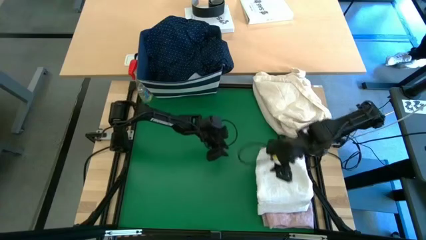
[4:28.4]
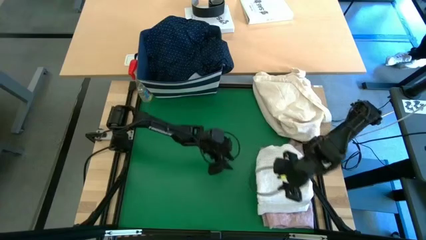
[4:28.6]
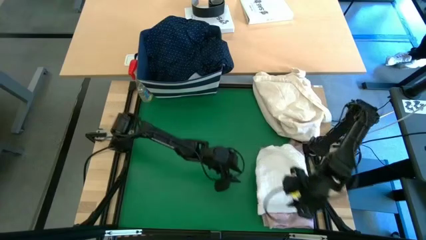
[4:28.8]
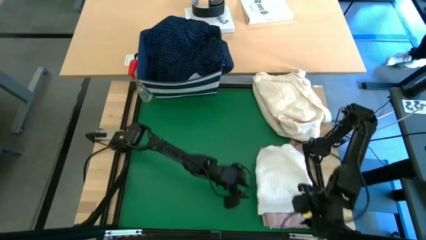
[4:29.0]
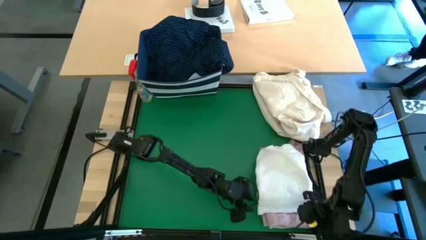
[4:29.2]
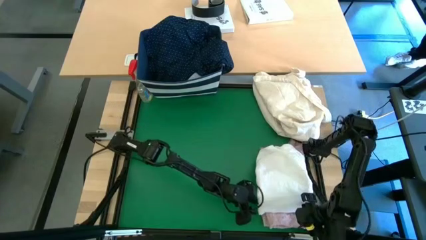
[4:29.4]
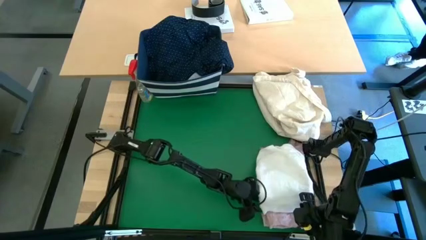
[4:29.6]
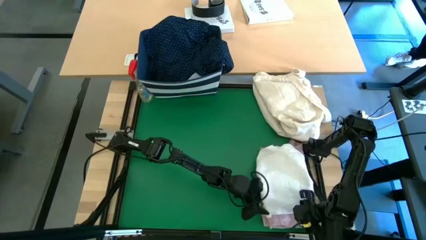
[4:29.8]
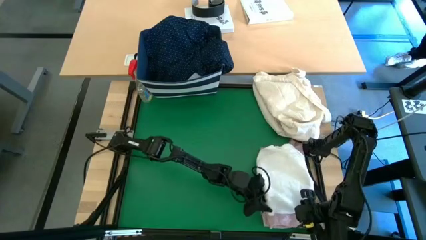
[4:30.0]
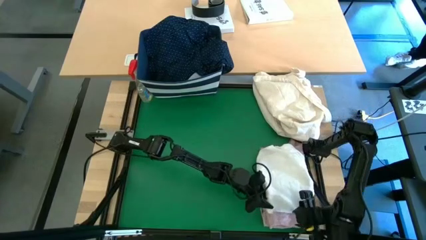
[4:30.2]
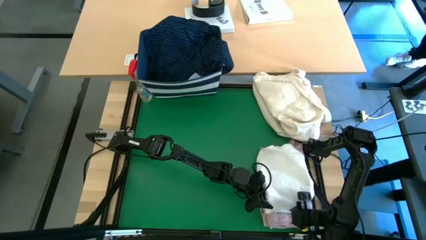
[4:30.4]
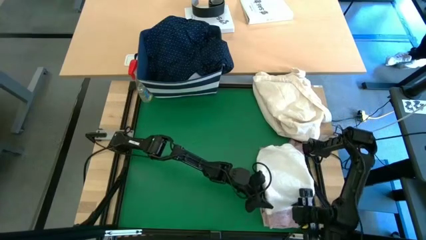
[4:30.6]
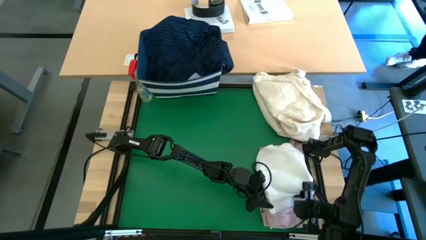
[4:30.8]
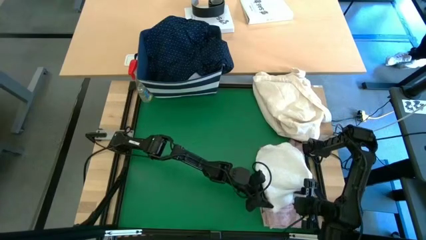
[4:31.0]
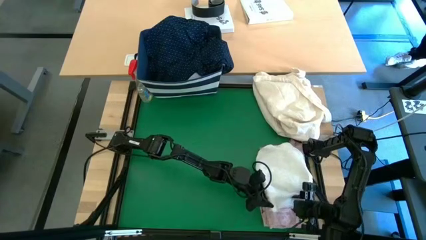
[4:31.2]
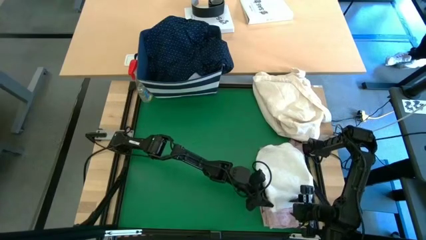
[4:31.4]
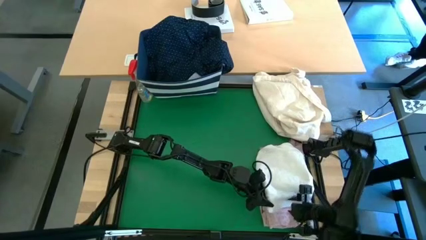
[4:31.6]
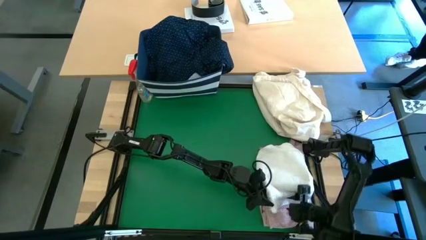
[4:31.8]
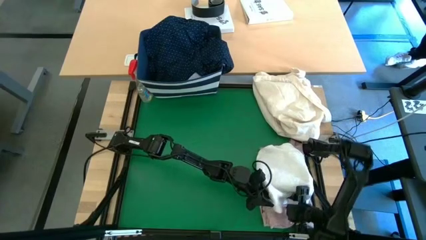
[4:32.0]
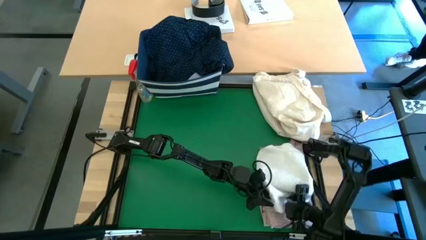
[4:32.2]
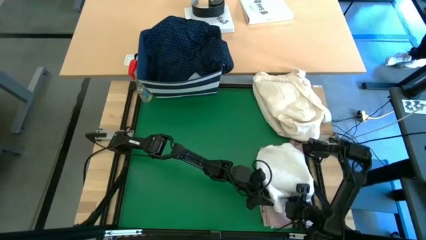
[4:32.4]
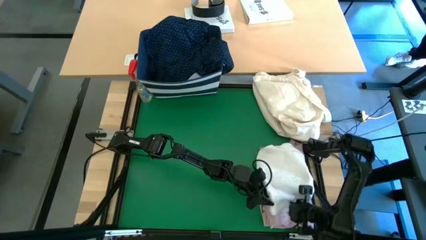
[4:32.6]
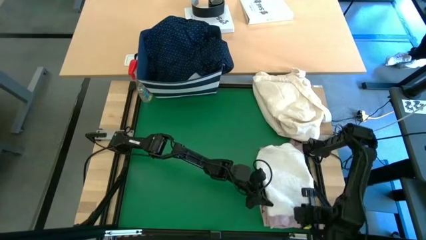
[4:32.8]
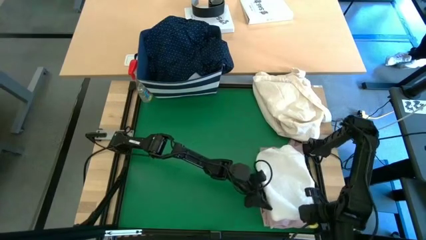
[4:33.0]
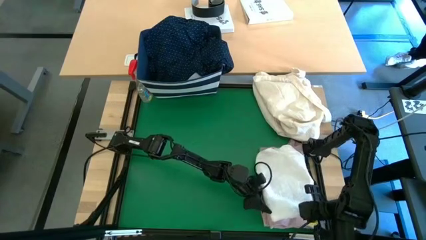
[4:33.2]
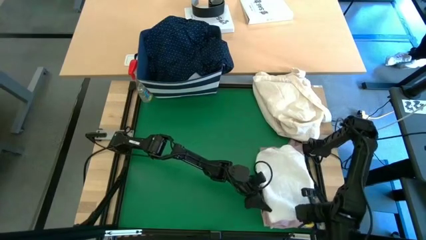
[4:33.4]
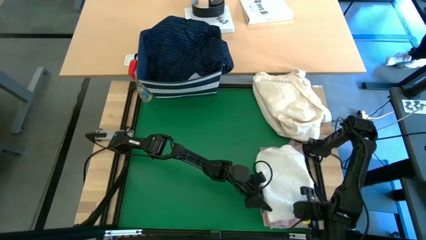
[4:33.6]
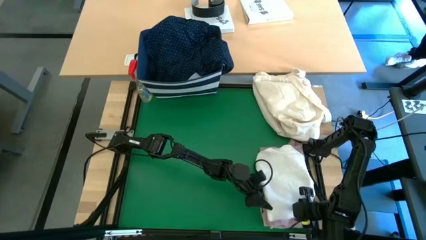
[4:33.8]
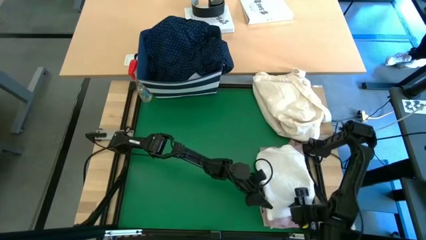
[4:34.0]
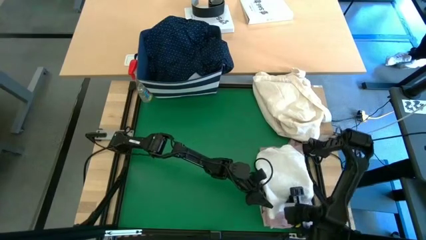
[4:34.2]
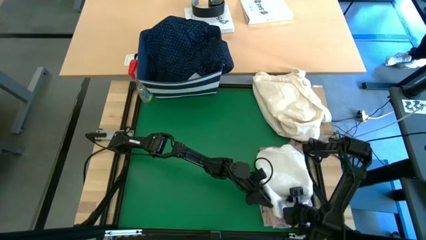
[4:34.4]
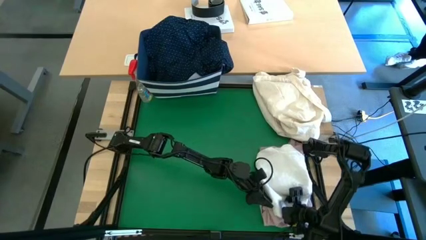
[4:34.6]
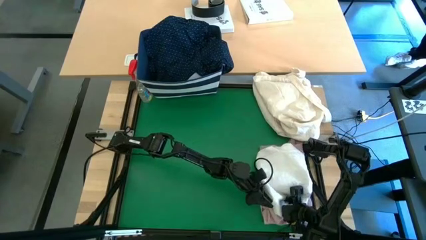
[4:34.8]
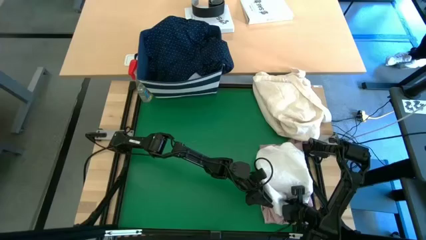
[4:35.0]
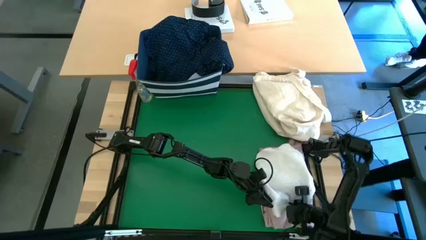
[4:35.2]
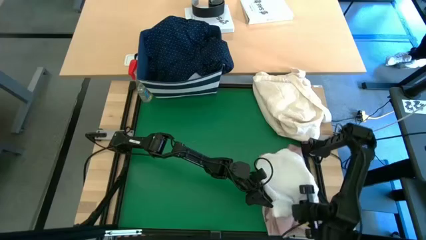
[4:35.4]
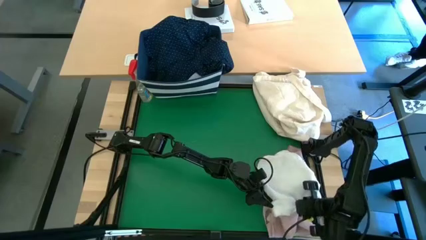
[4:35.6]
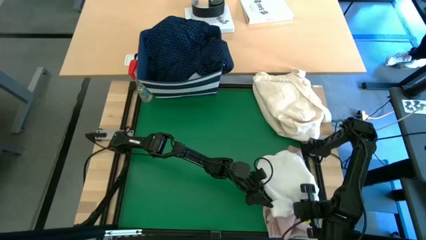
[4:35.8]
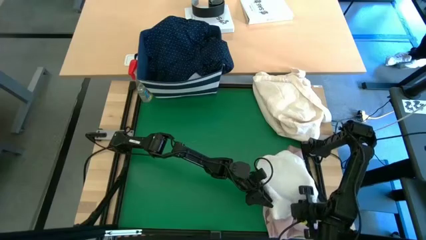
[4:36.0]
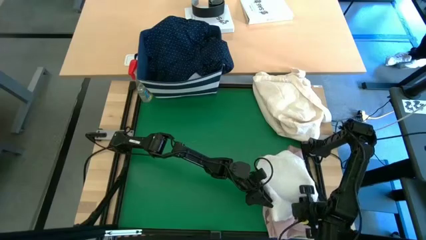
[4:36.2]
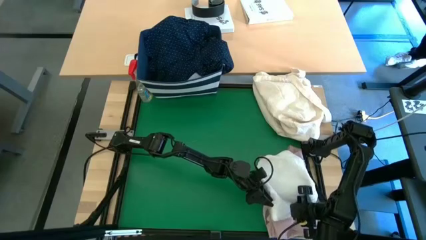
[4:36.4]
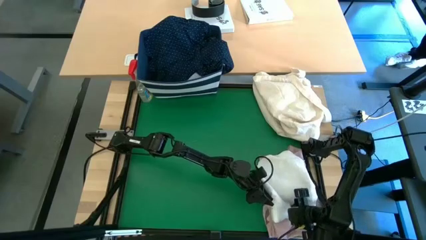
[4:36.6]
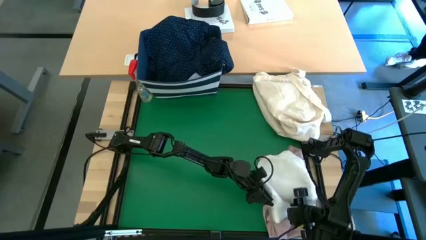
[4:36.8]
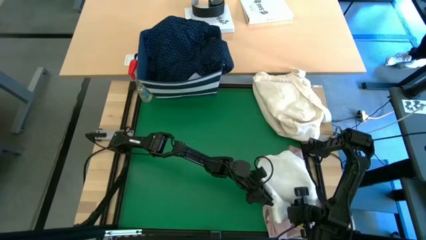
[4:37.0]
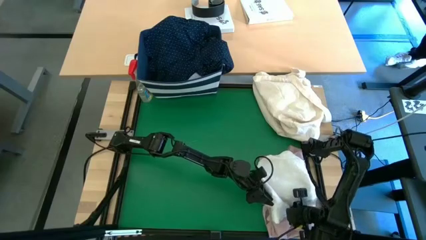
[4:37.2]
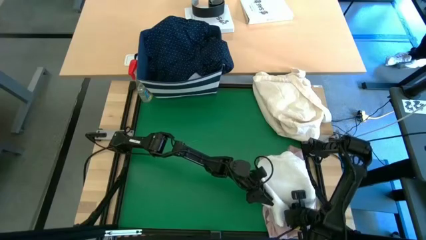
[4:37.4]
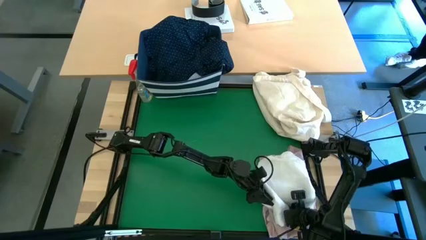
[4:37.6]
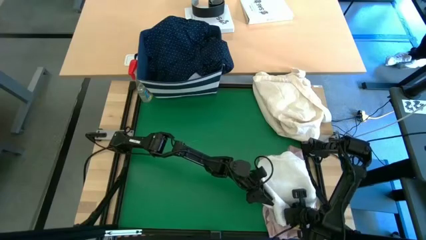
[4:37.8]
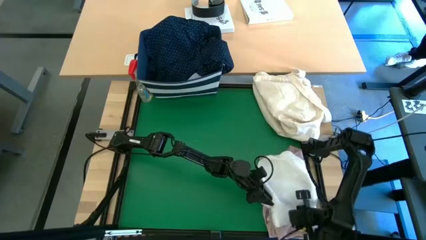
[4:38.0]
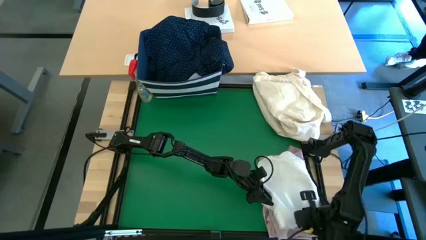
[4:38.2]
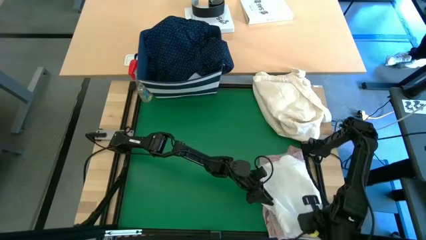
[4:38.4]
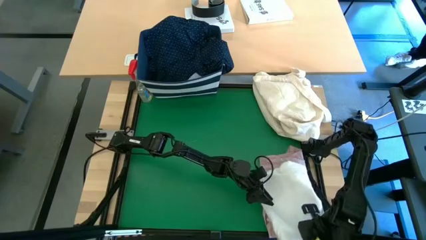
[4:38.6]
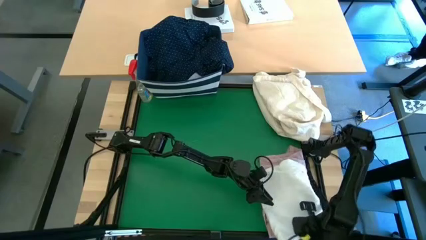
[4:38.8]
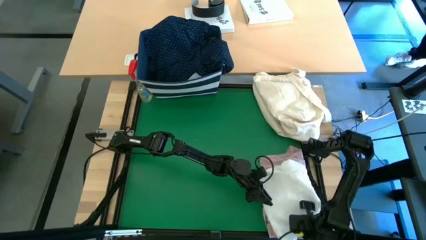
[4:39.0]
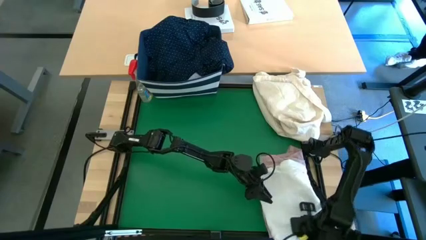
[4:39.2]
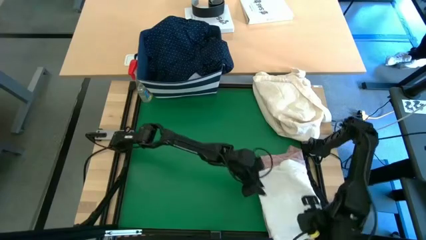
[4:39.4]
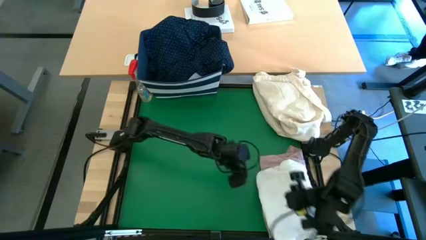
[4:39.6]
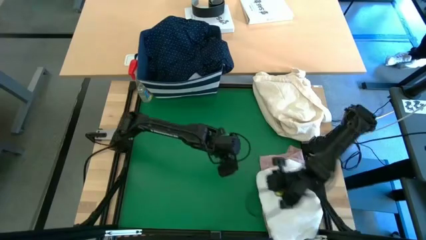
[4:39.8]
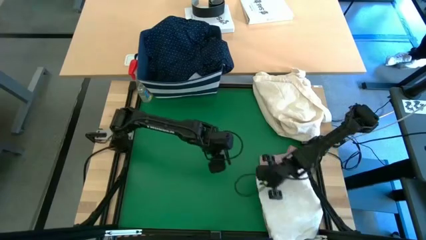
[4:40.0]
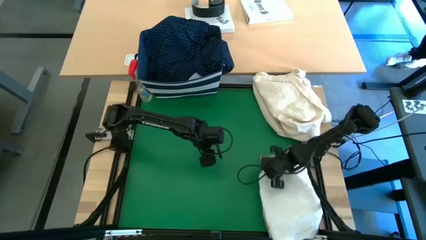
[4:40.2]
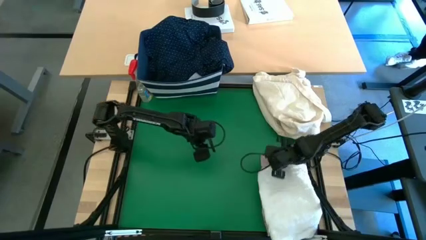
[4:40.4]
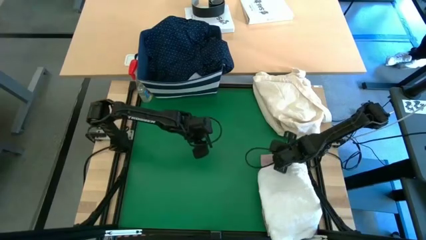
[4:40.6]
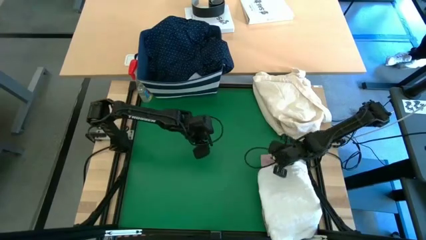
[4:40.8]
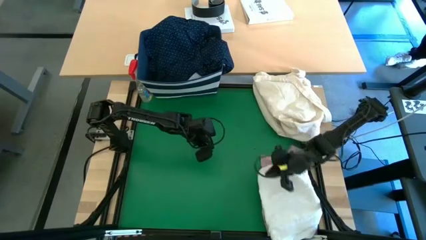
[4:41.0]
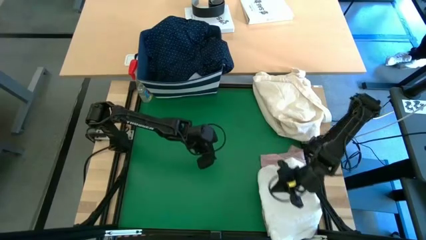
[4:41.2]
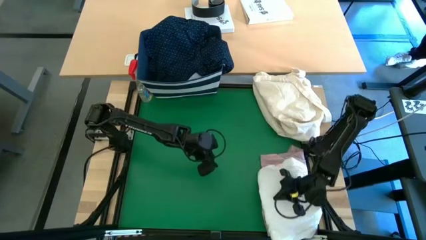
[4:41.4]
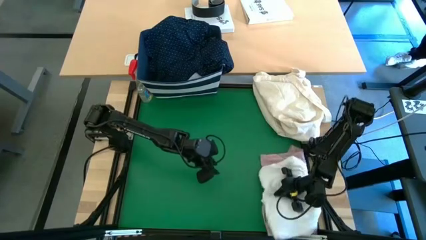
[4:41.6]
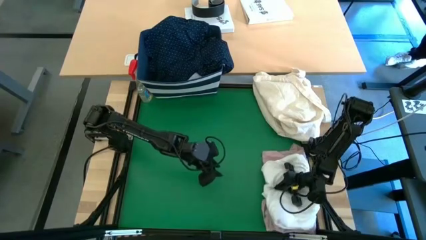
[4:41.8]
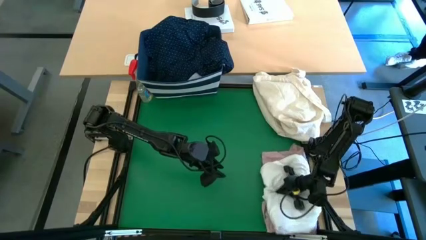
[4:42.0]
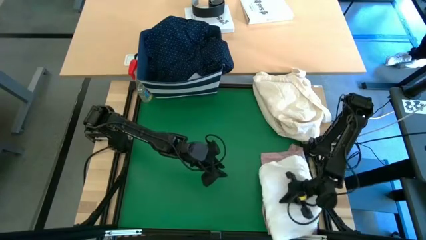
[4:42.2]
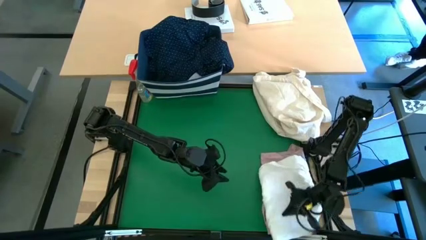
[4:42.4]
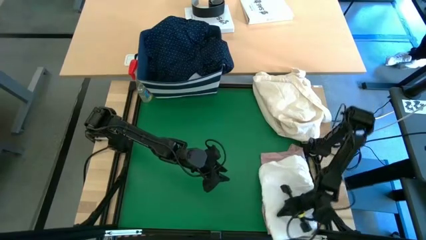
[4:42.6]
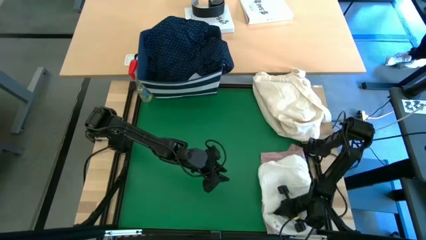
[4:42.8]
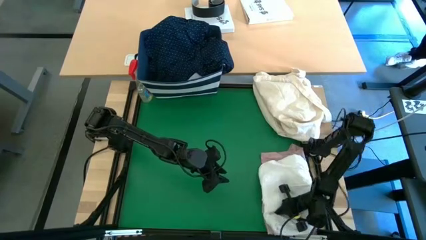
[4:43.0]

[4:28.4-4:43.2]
Task: Fold laundry
Stack the white polo on top of the red polo

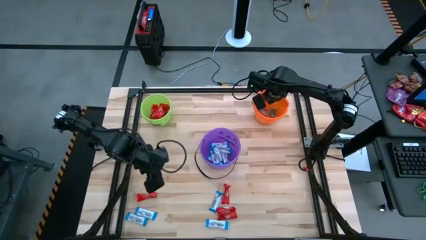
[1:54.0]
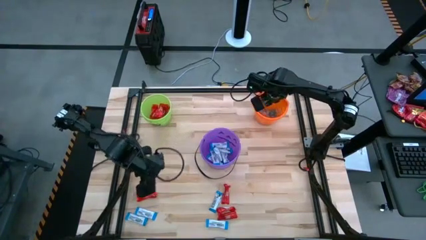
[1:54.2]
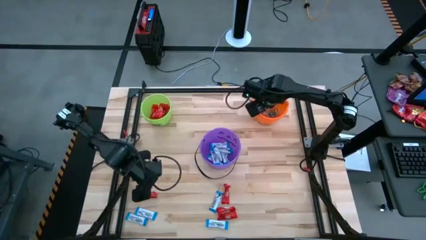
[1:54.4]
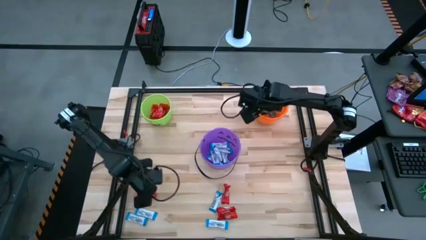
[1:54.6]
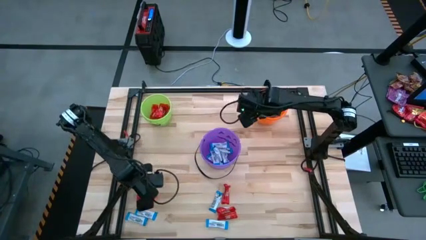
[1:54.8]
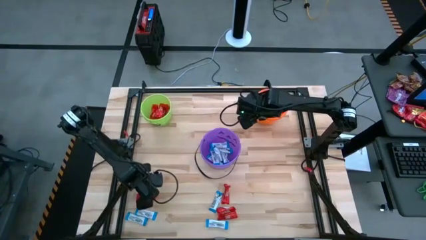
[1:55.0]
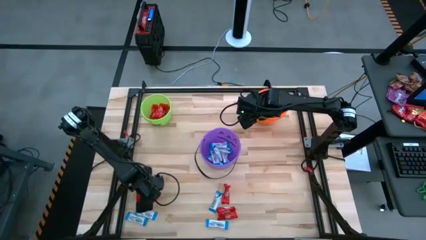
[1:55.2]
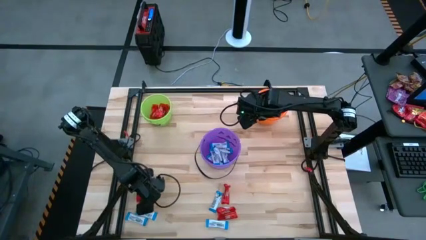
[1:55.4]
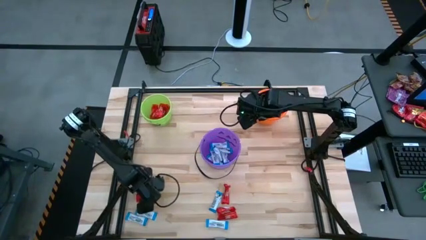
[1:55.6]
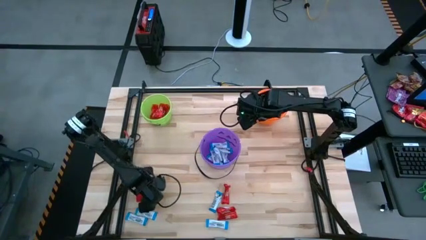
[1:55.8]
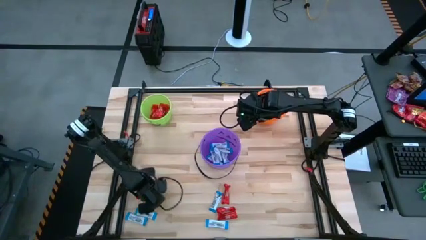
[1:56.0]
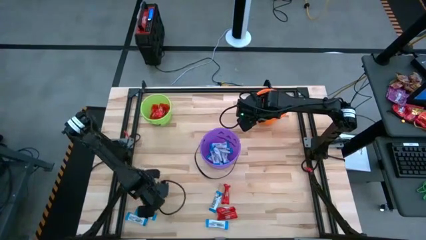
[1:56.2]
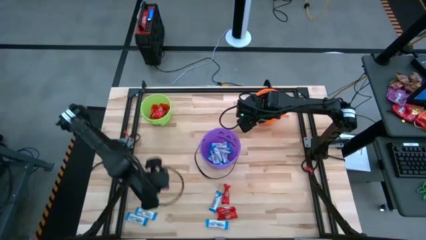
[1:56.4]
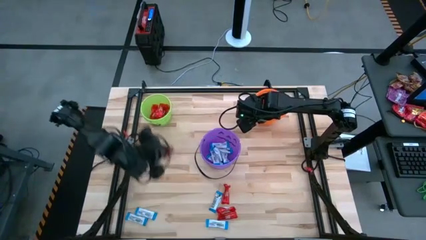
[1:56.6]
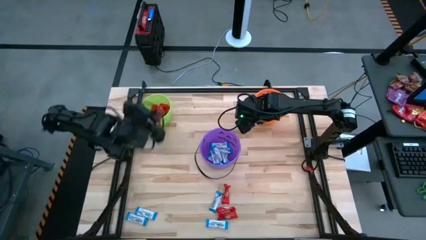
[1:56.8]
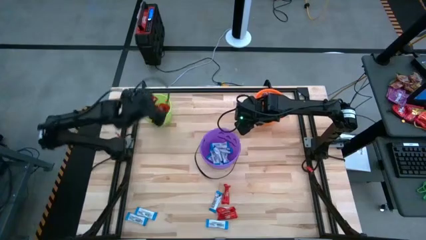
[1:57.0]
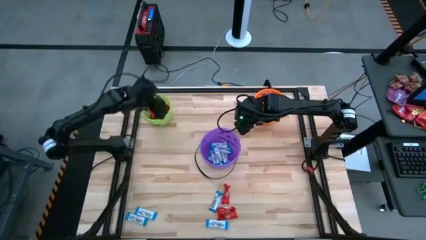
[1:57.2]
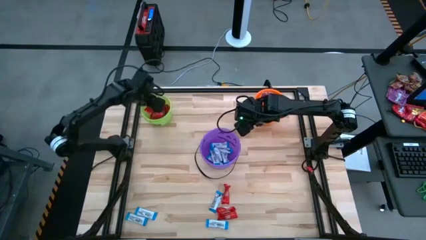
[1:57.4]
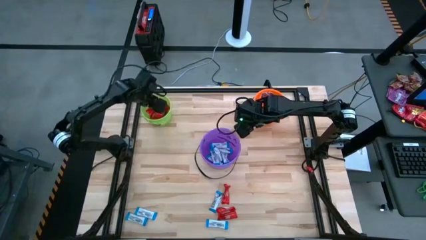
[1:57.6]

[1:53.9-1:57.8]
Task: Sort candy by brand, put in halloween buckets
Put the red chocolate into the green bucket
